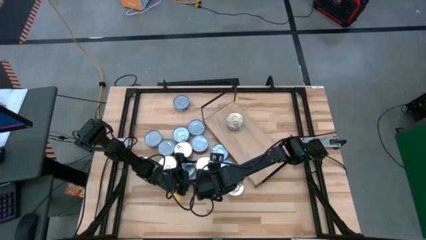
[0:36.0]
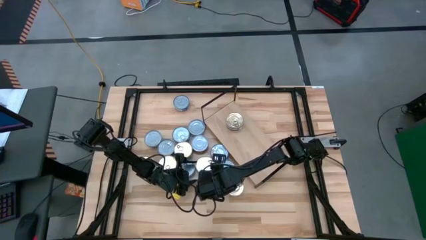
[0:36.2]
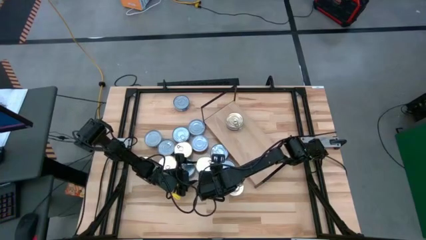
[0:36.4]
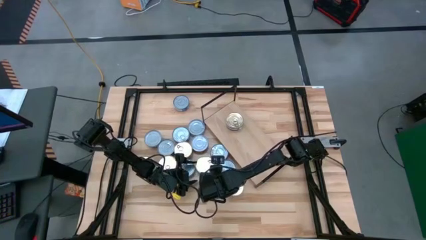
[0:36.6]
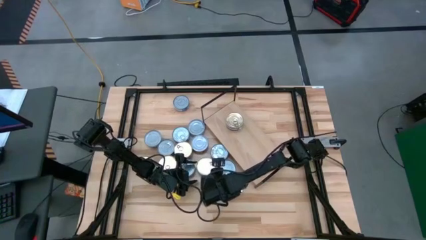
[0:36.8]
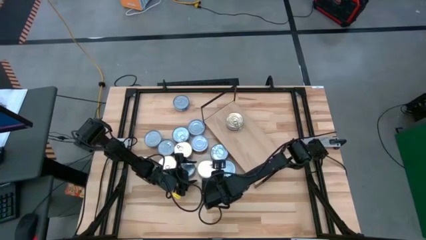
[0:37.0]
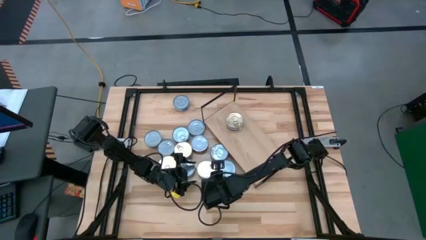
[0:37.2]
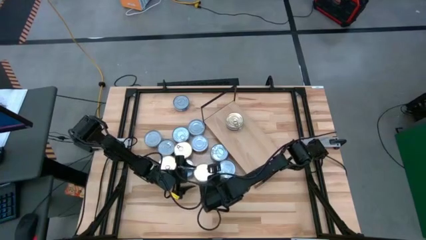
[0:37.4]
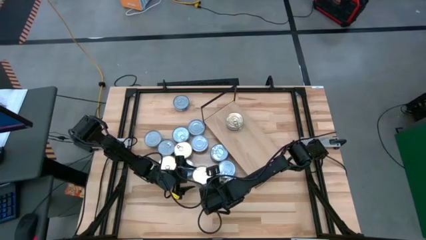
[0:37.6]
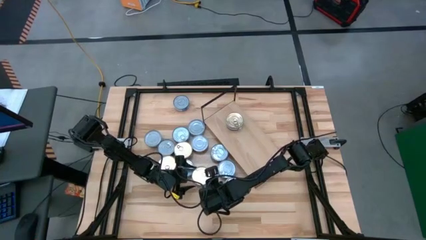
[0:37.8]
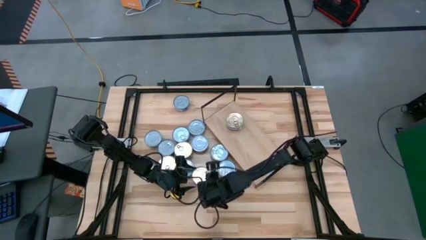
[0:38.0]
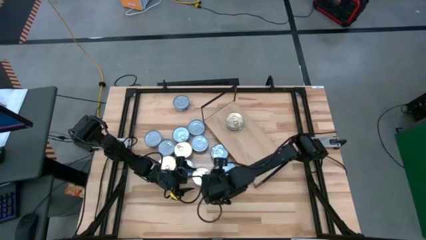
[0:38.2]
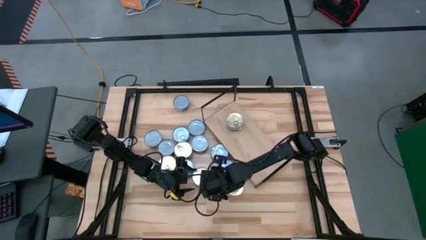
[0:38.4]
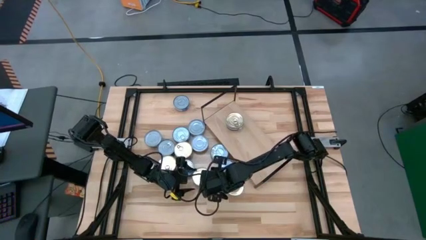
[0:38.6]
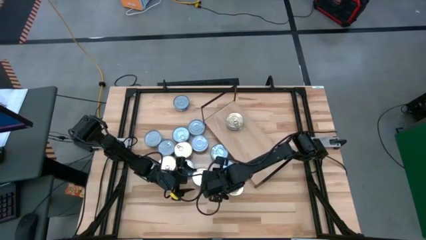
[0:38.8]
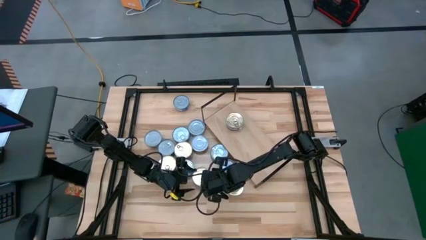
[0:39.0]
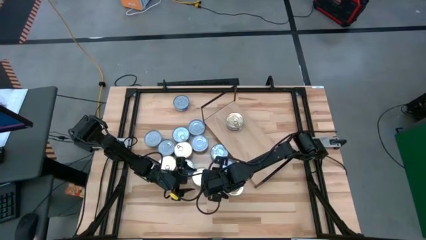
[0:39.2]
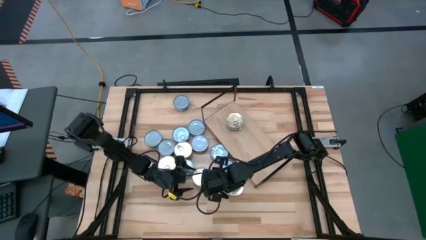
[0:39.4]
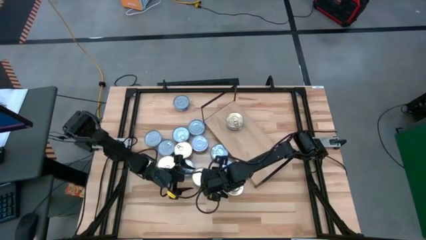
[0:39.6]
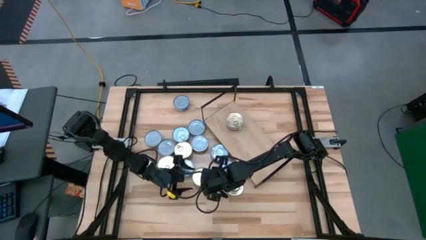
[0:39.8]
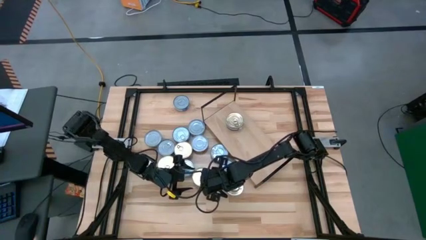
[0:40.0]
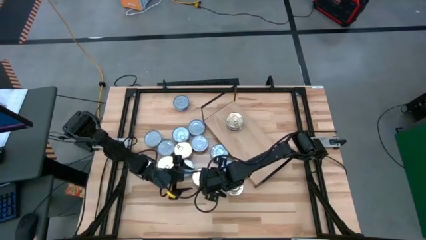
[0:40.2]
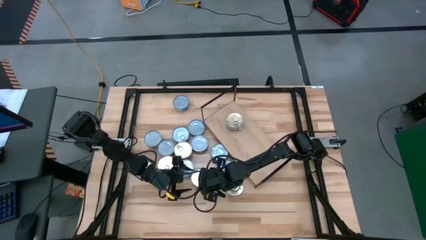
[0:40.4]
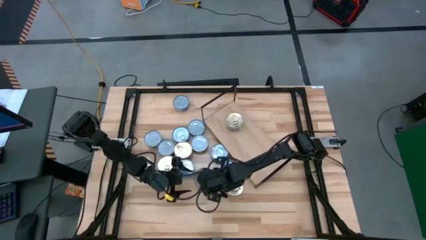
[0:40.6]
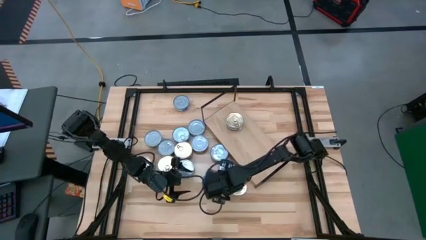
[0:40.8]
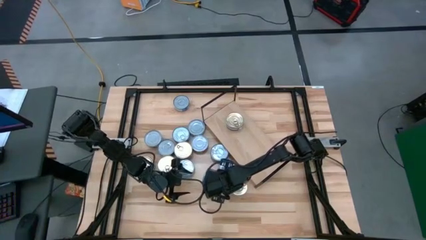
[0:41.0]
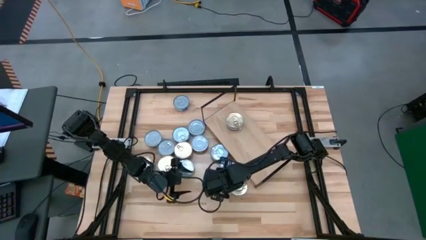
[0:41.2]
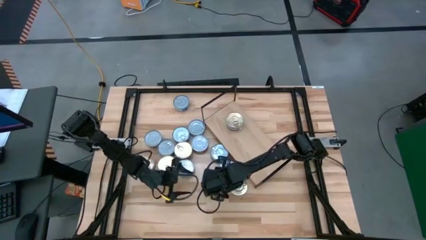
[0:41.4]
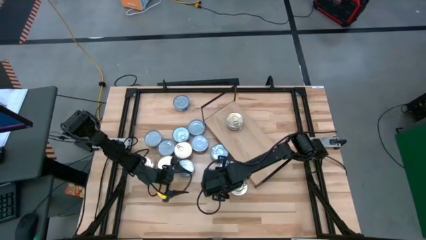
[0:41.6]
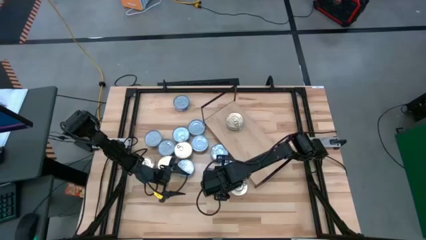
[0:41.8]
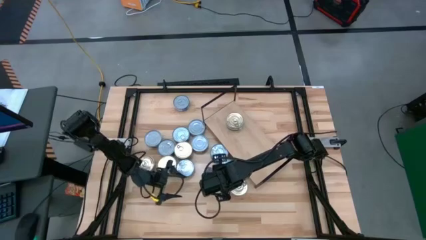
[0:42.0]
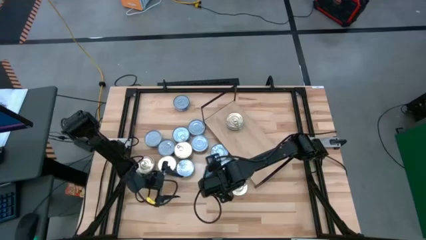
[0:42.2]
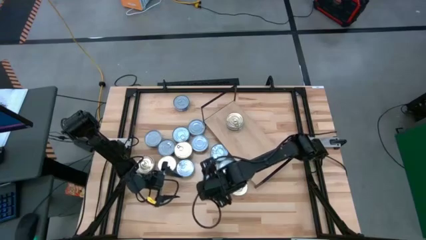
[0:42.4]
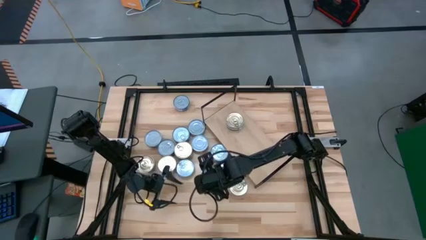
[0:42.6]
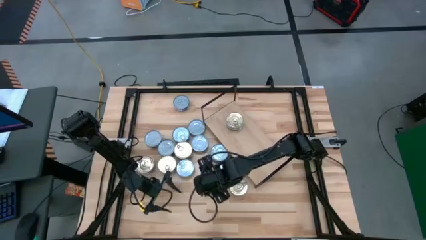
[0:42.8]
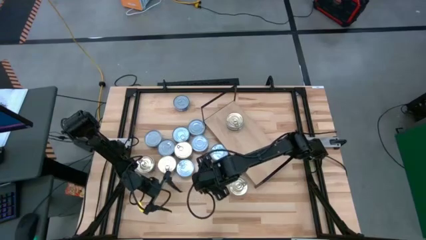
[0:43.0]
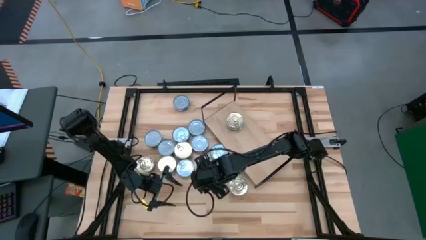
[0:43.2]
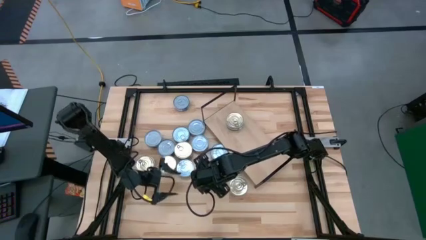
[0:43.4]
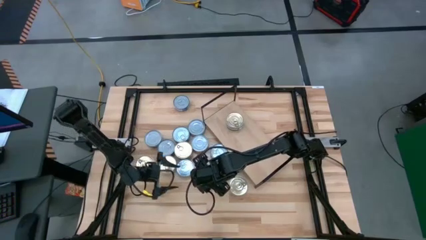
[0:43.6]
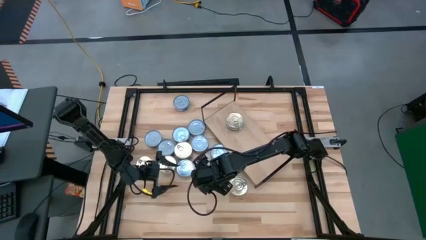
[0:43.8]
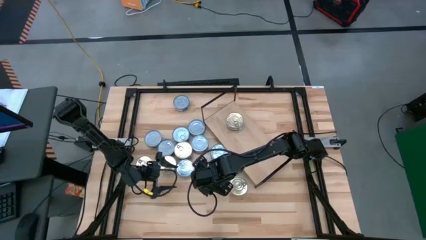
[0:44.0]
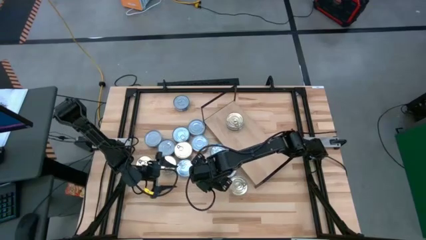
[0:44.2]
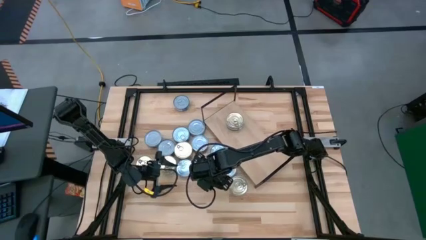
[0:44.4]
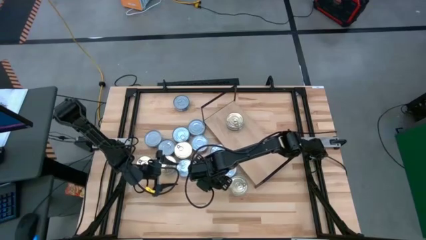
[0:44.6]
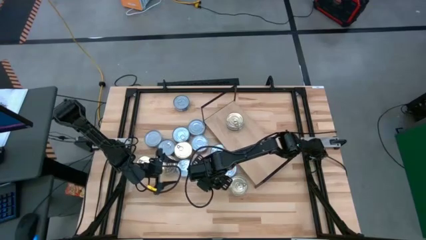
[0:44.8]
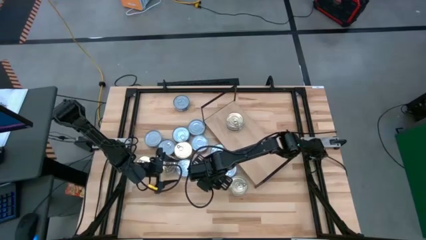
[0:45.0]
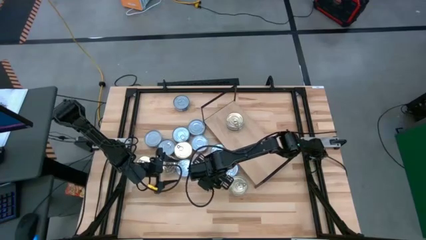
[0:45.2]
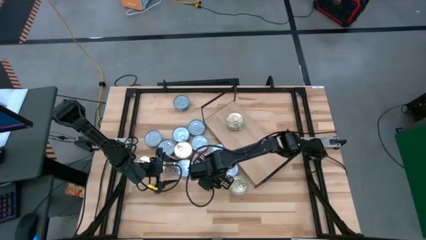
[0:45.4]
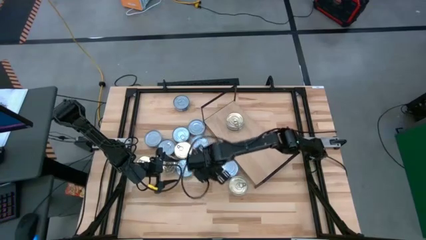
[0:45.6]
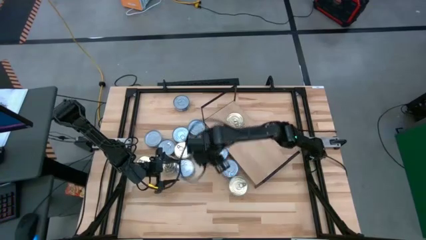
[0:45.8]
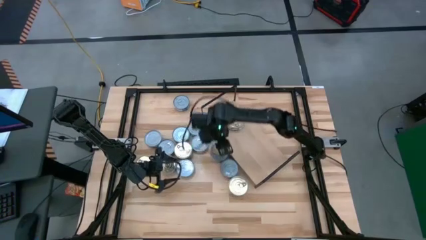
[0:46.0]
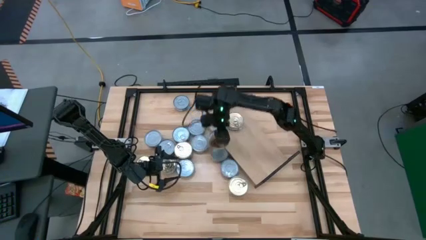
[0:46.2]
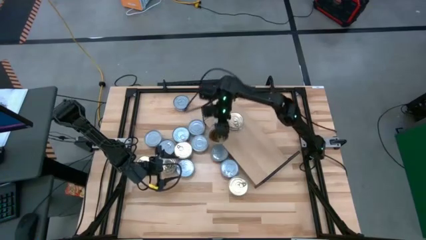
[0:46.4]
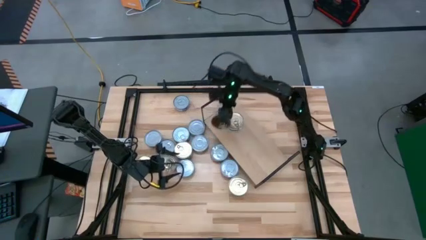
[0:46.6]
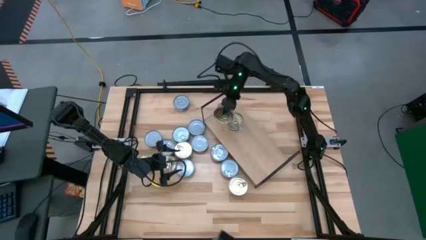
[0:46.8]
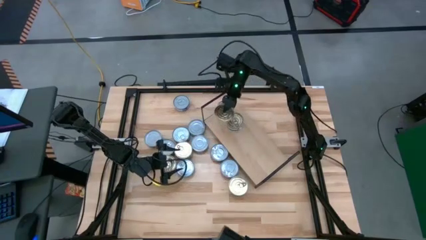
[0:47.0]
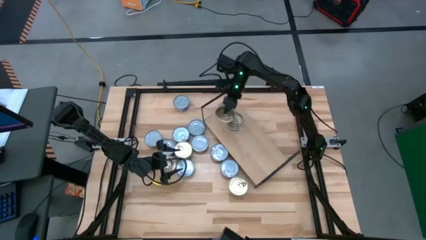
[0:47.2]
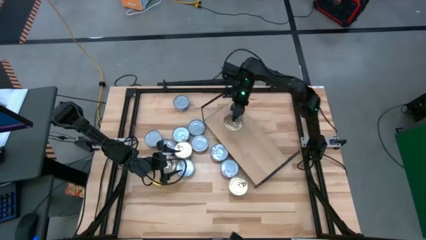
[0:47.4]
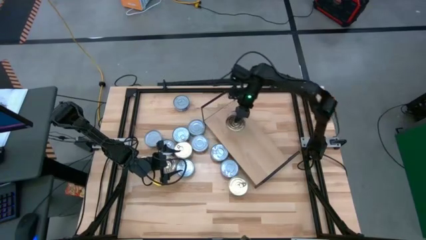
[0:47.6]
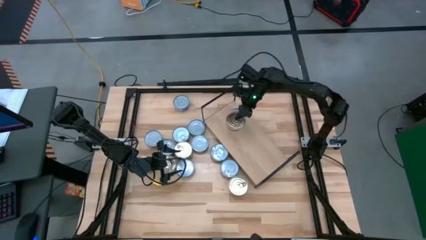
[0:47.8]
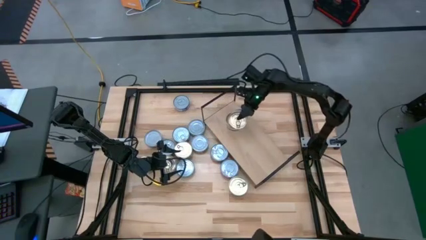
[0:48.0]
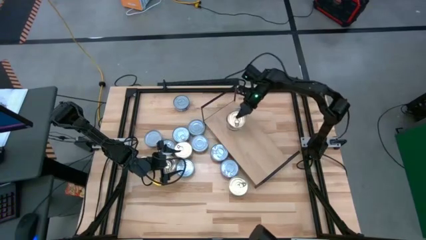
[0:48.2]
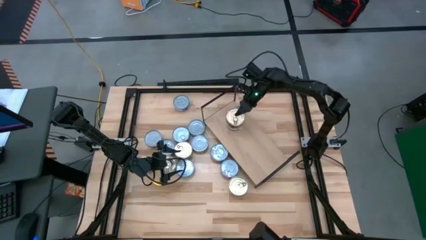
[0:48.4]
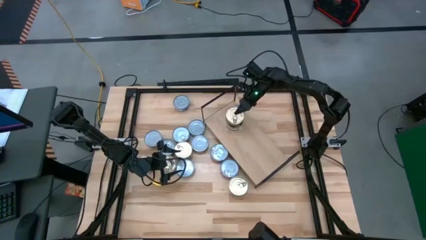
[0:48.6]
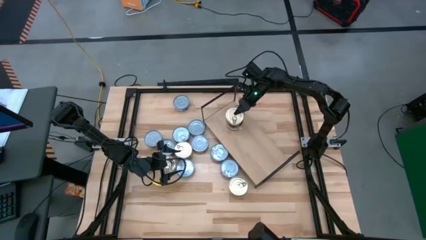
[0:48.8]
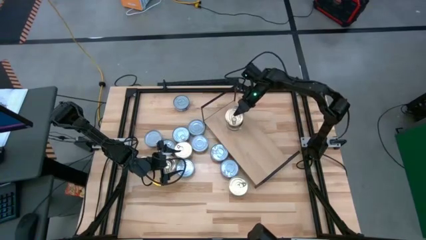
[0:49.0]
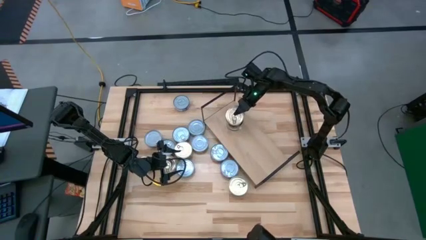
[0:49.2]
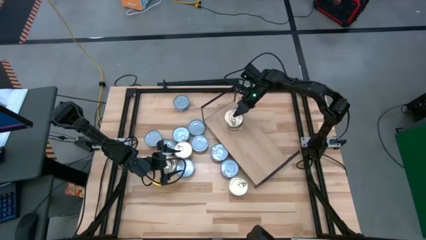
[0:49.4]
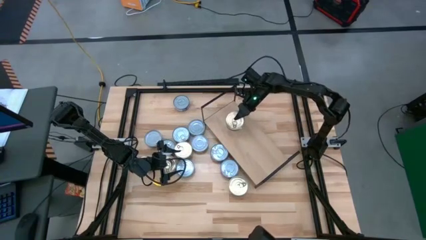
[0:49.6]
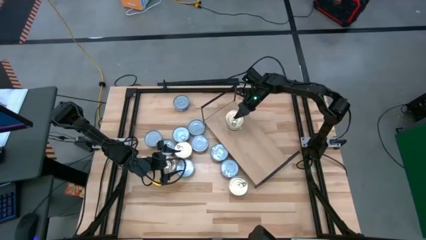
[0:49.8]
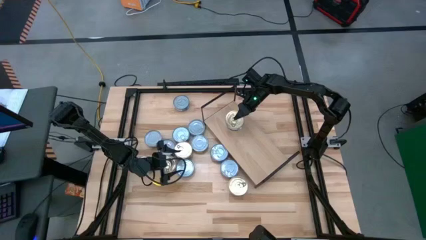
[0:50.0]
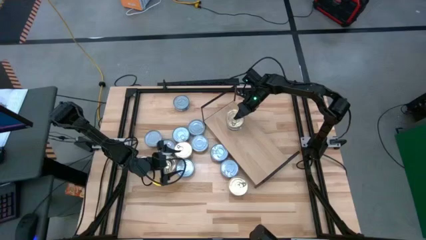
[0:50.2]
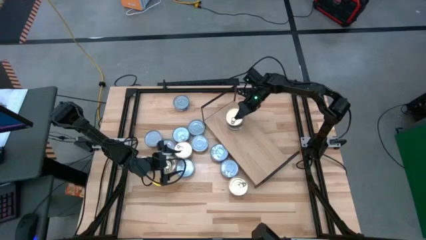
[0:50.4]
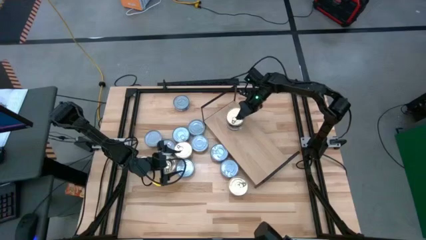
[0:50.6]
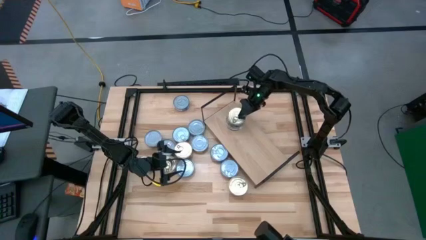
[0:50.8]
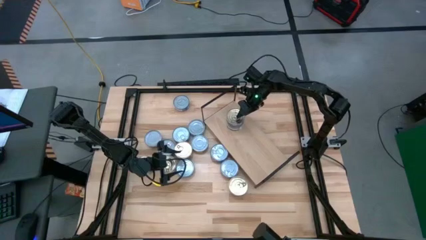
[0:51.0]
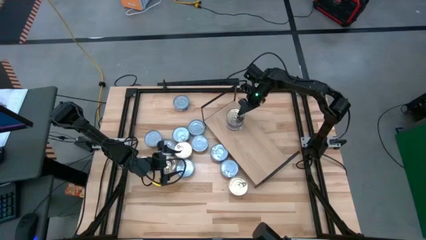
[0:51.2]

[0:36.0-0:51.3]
Task: Stack canned seafood by type on shelf
Stack the blue tuna can on top of the blue tuna can on the shelf
